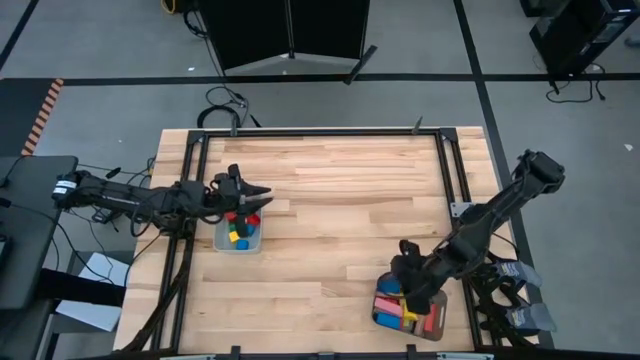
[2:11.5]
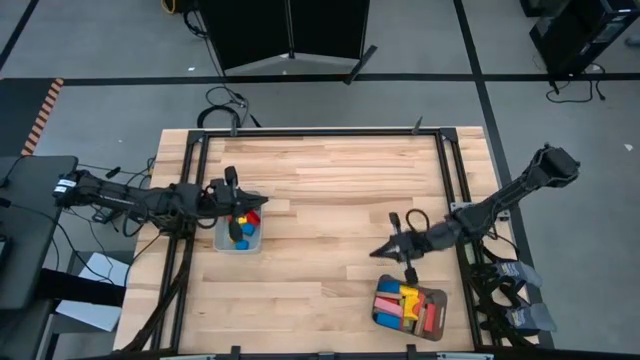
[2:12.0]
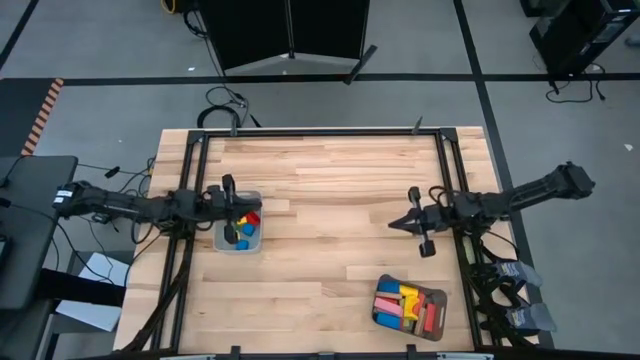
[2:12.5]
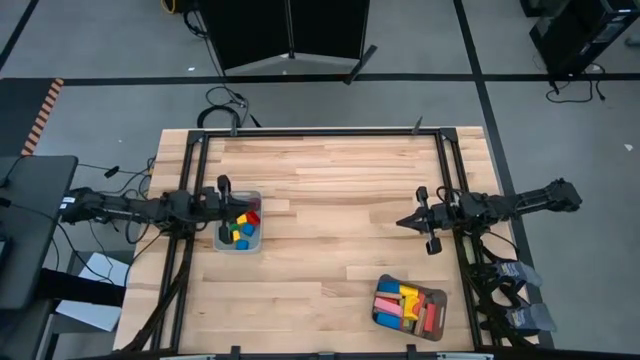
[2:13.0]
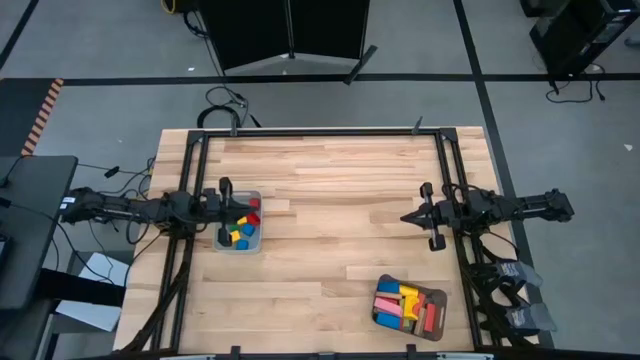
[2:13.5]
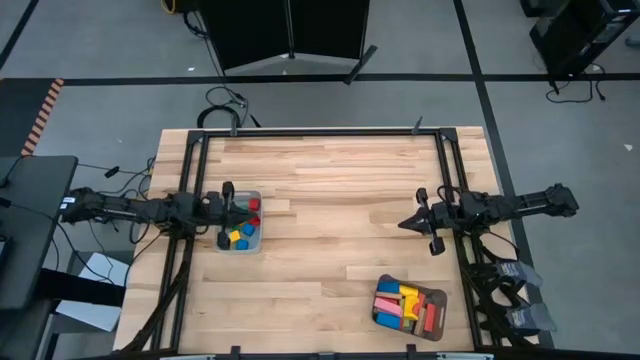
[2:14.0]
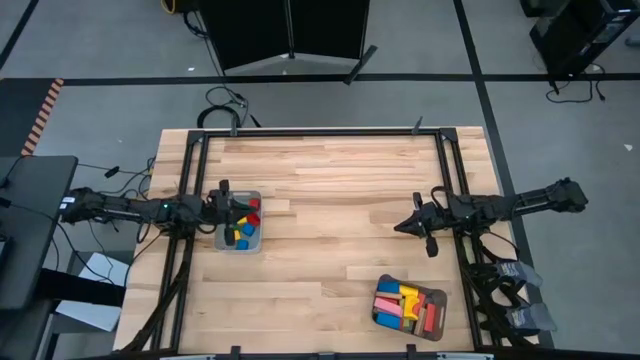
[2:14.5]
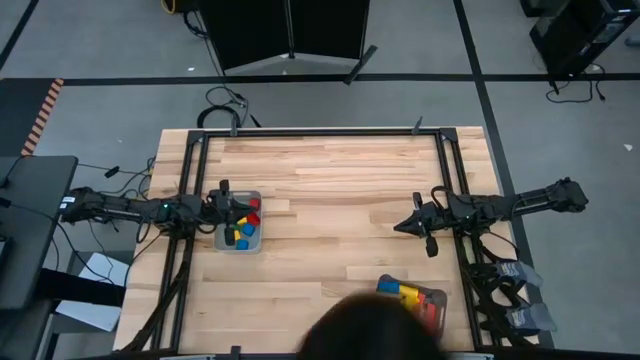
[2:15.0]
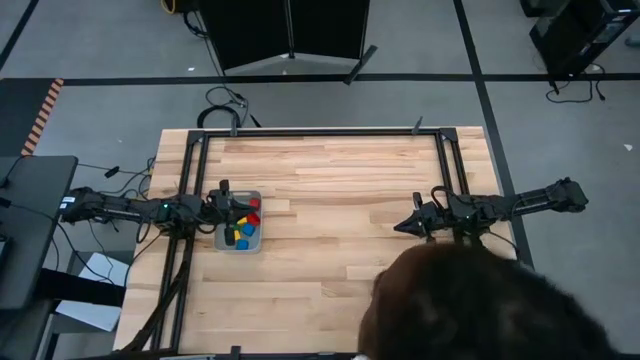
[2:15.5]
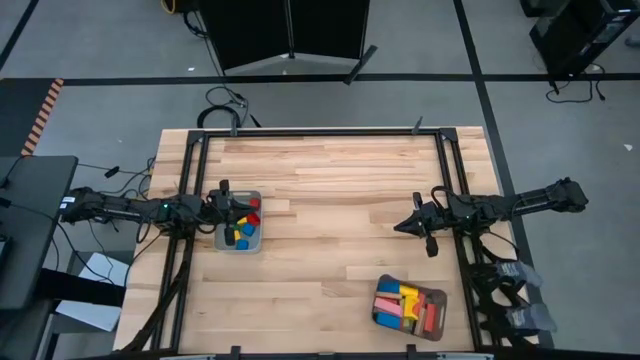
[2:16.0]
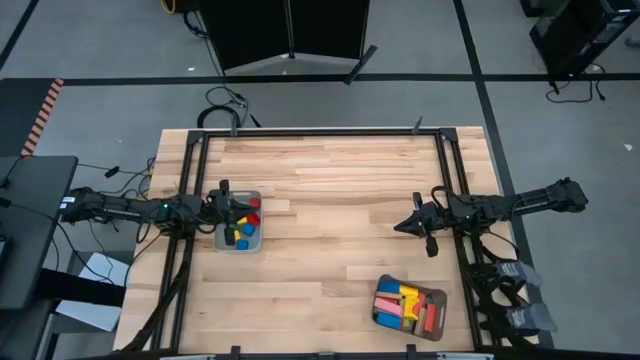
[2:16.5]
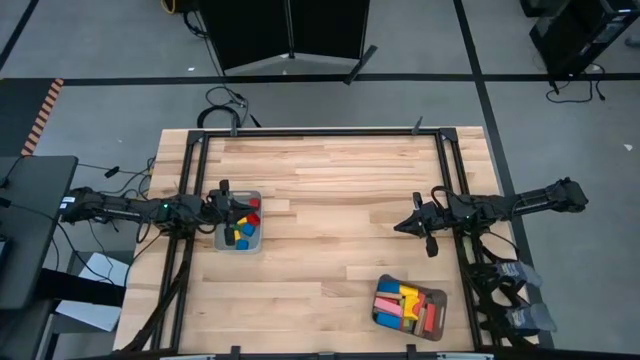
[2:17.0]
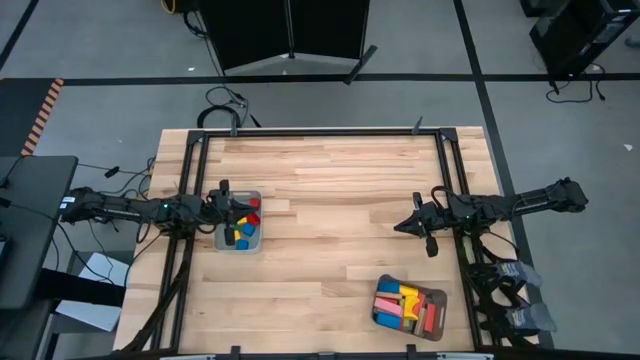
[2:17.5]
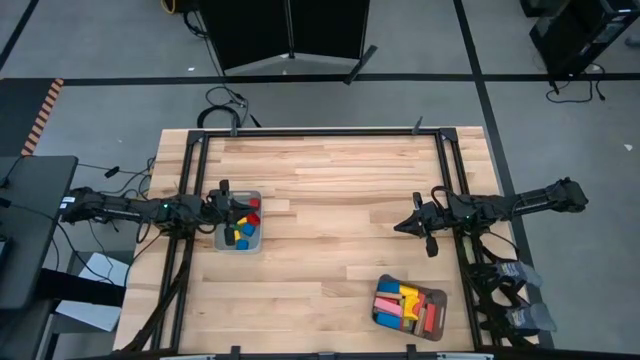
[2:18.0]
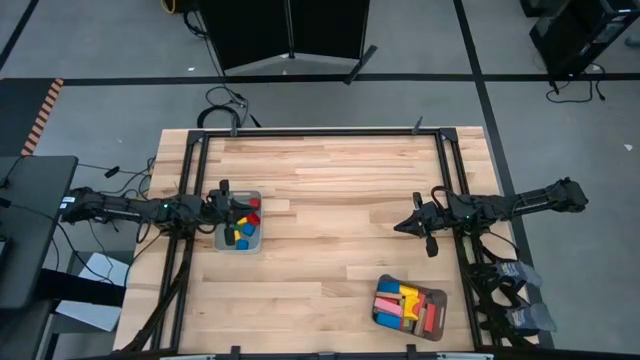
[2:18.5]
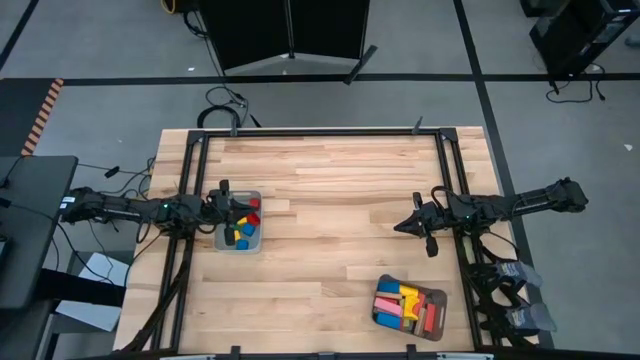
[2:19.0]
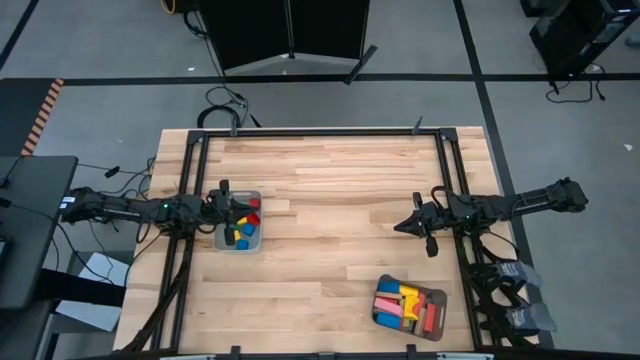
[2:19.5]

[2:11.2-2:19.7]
Task: Sort blocks by size
Return to Home Position

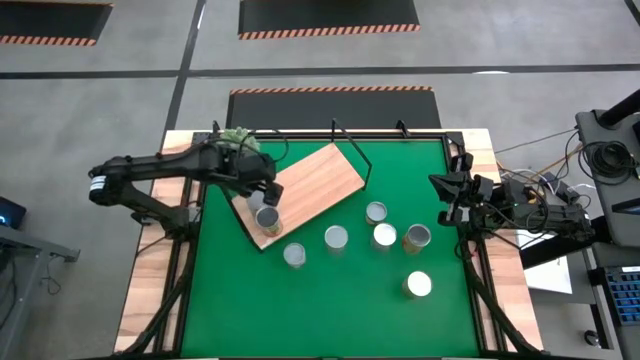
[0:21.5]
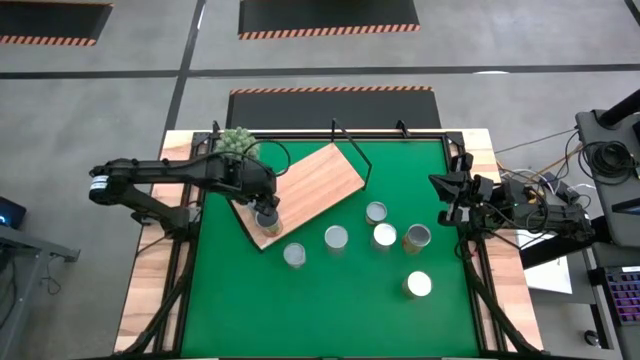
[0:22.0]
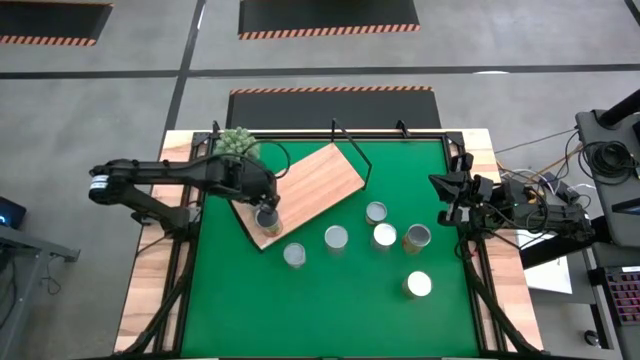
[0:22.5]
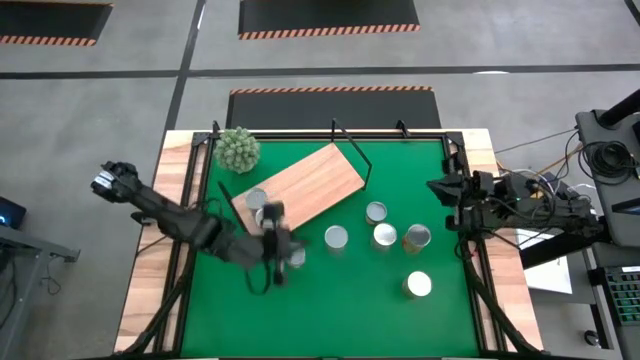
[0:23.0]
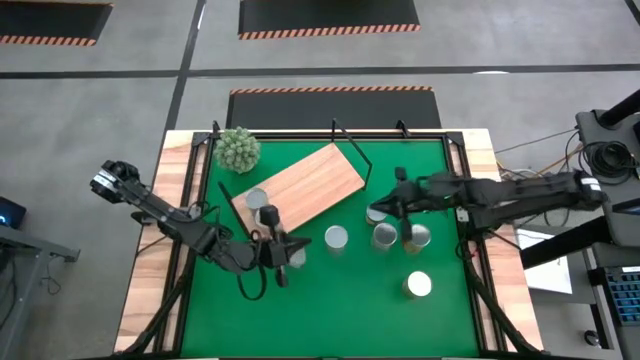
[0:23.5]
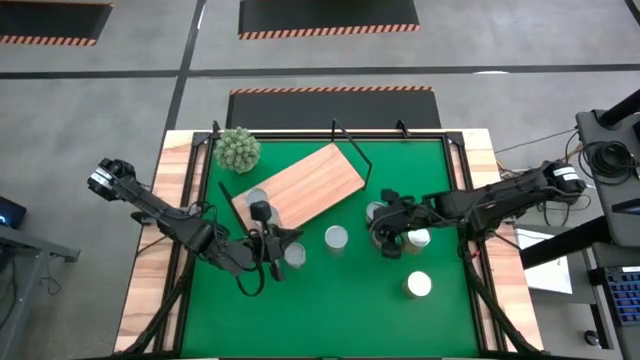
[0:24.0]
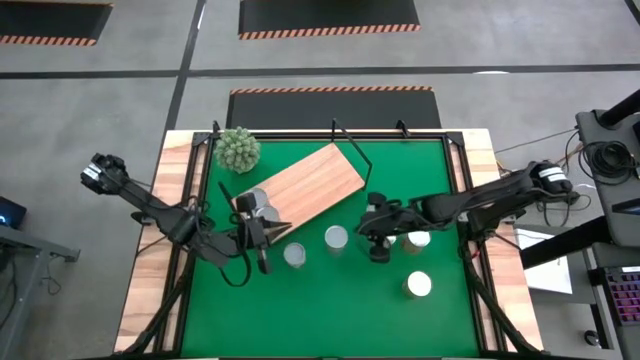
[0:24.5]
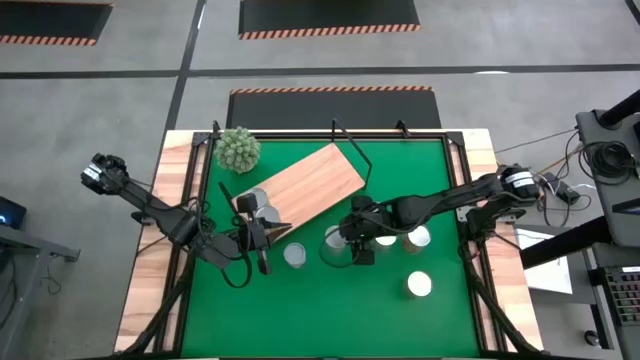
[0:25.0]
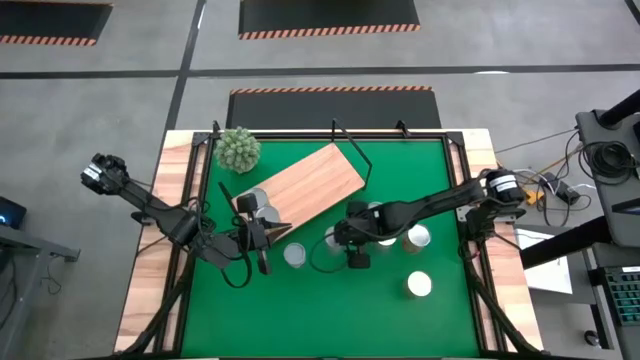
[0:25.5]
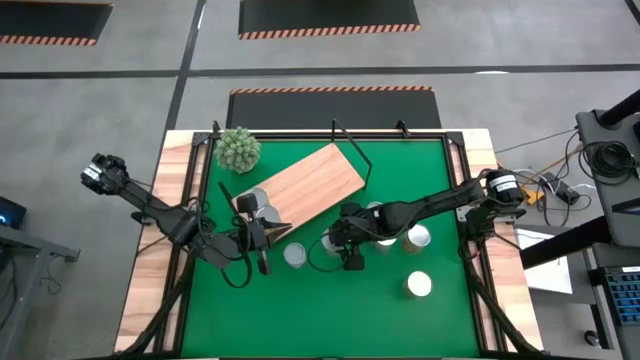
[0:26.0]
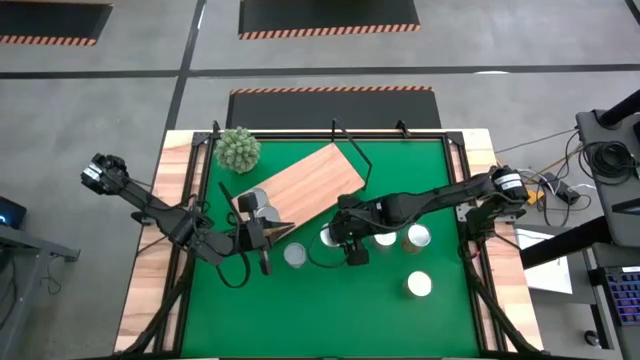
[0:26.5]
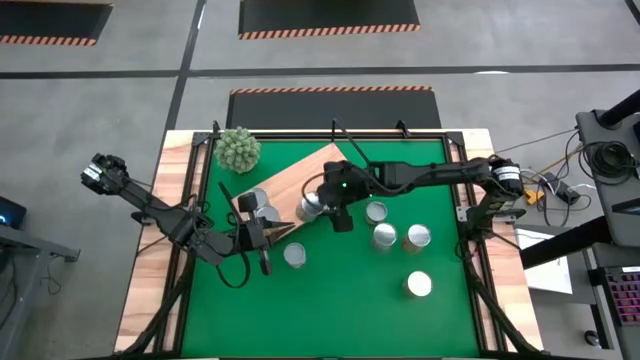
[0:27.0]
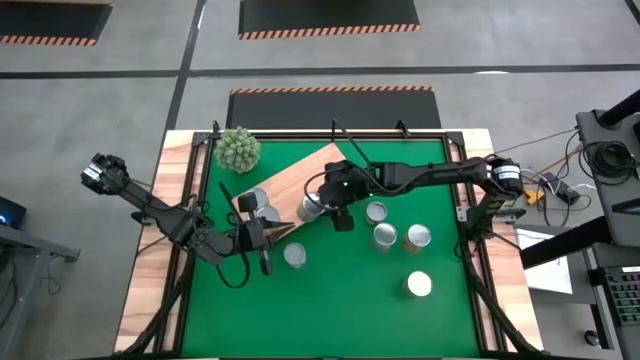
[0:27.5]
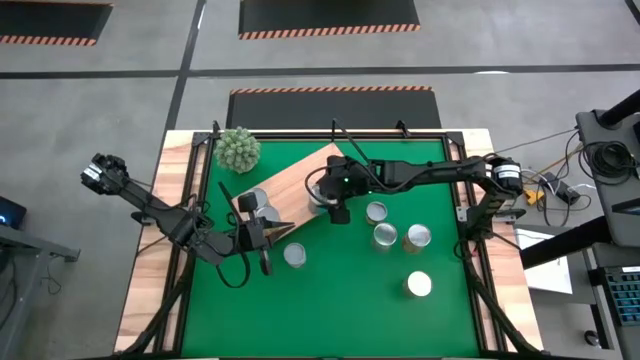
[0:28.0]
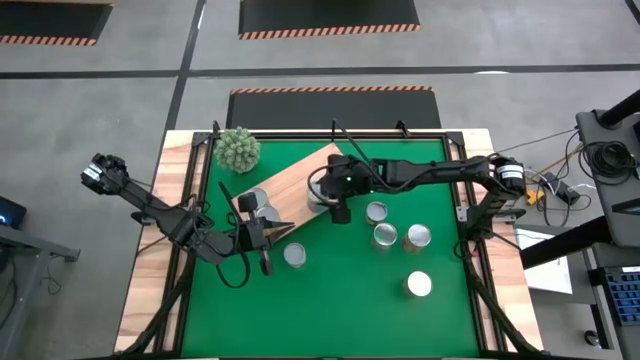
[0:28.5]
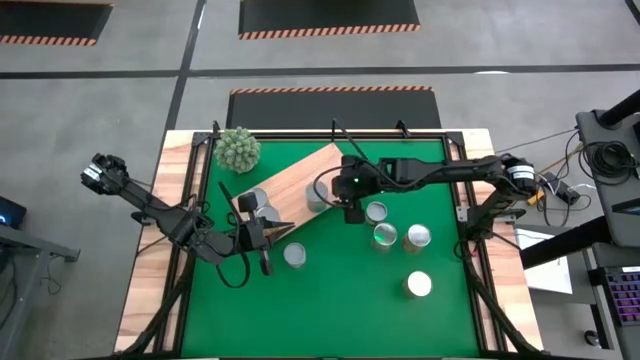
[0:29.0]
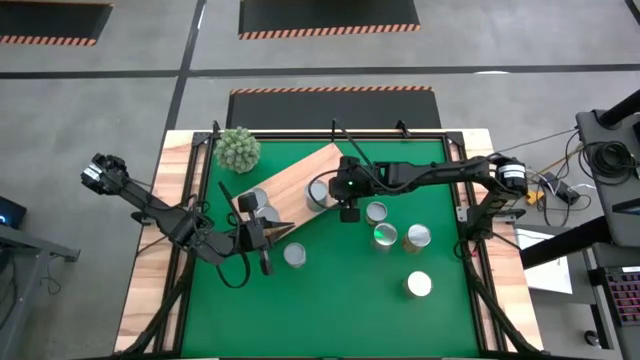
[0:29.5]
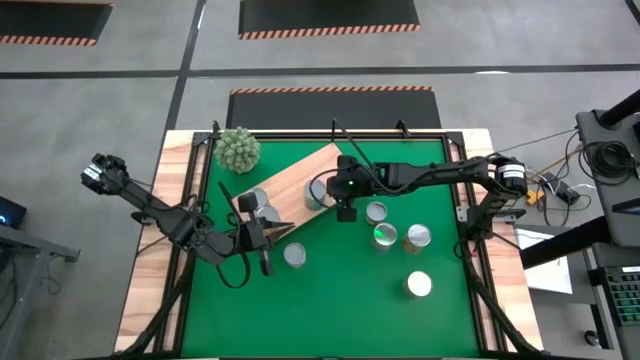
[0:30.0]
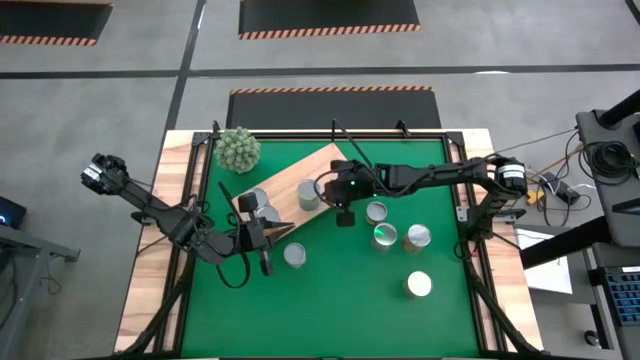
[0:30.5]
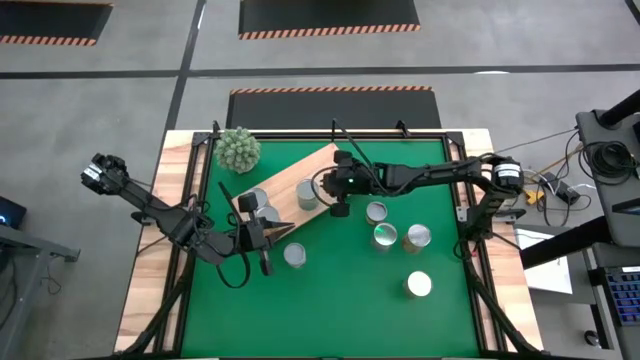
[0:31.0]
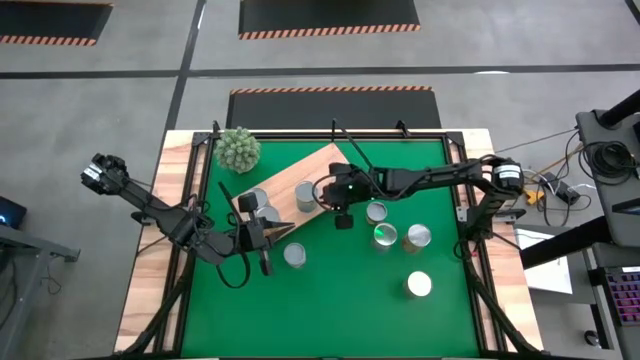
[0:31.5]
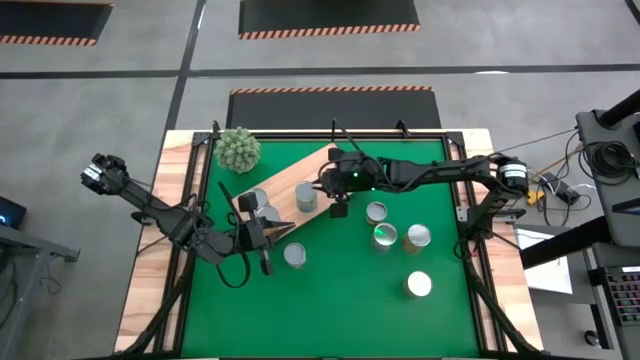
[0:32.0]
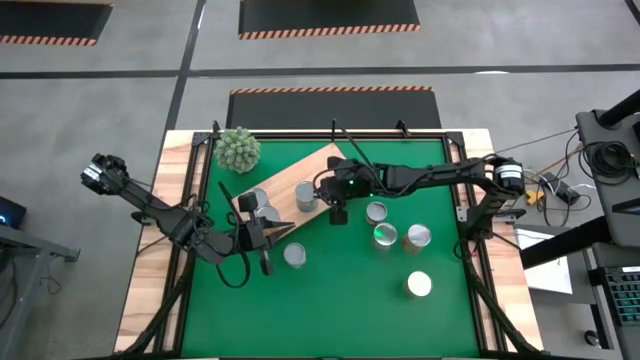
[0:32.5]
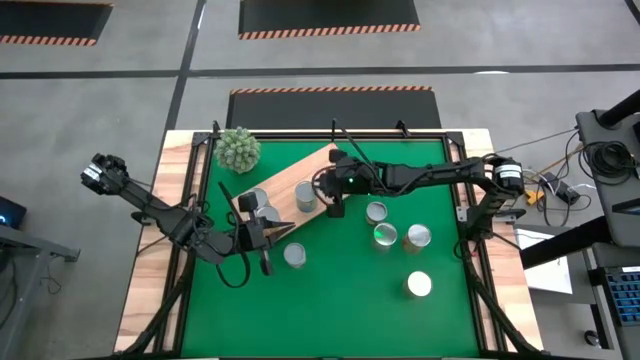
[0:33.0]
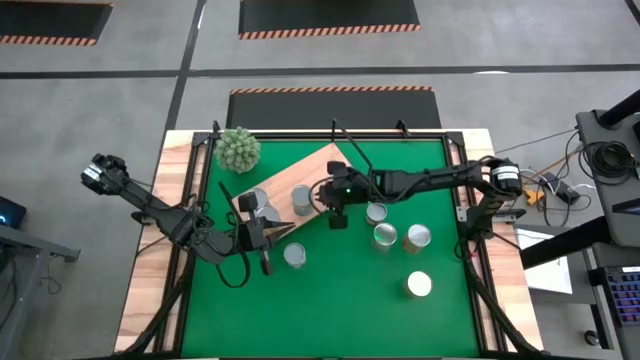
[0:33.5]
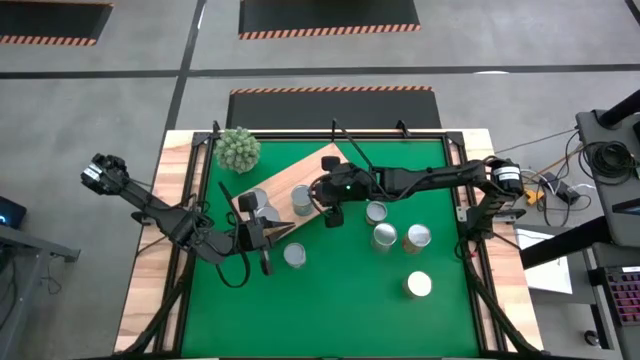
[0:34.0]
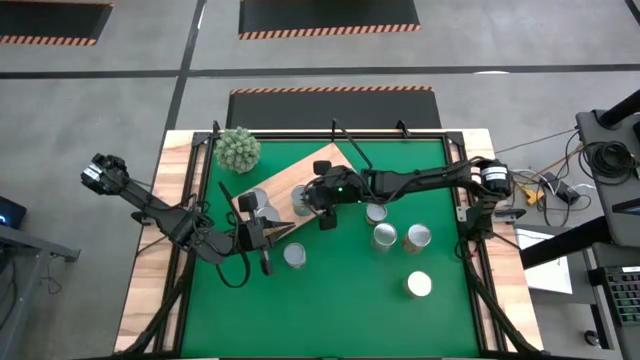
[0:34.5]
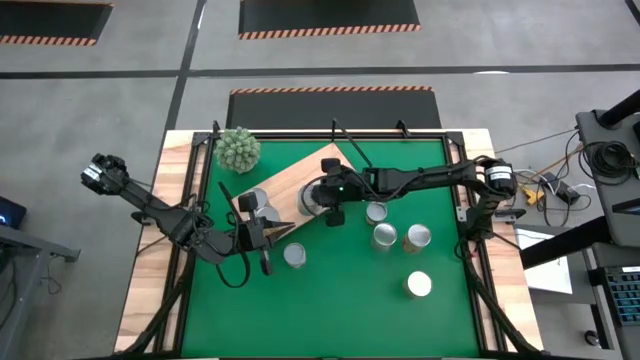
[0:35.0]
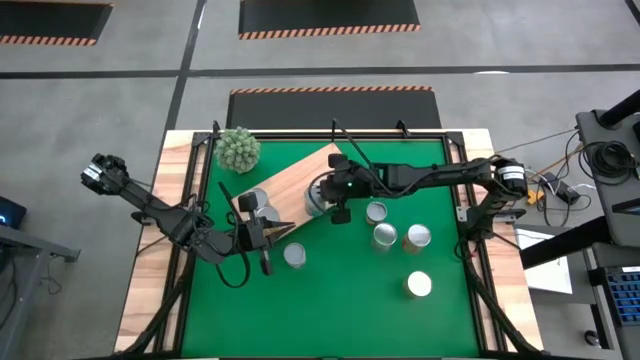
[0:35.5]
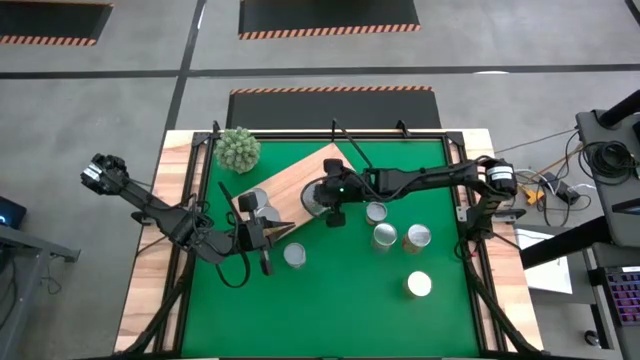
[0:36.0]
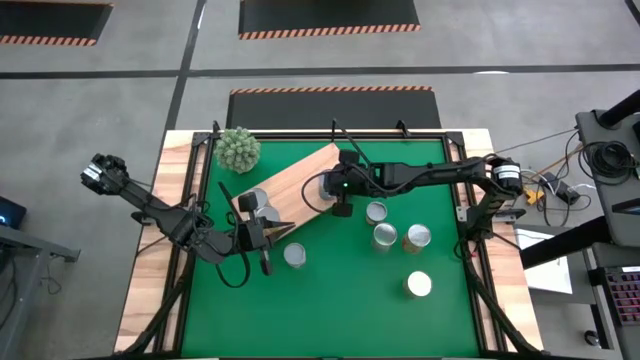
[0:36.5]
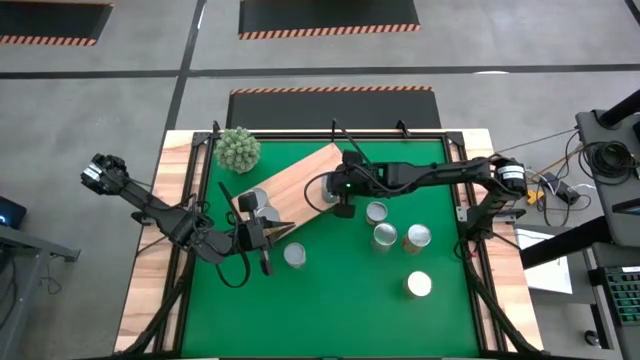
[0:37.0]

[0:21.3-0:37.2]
Task: Pick and place cans onto a shelf
Put the canned cherries on the shelf
